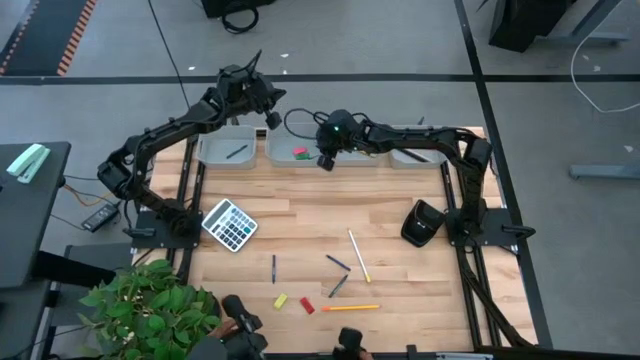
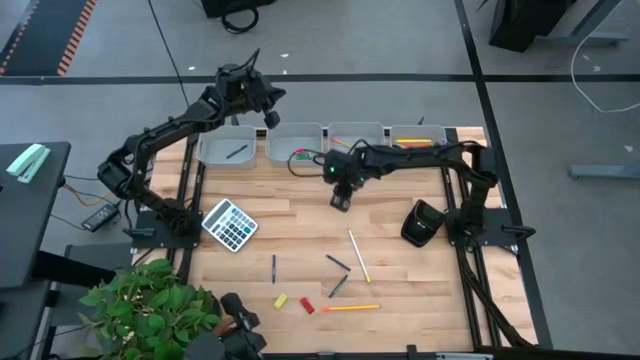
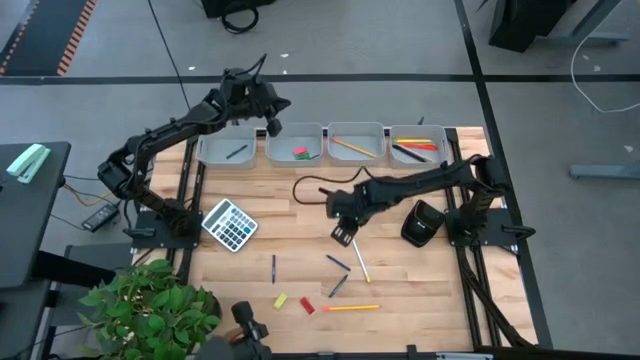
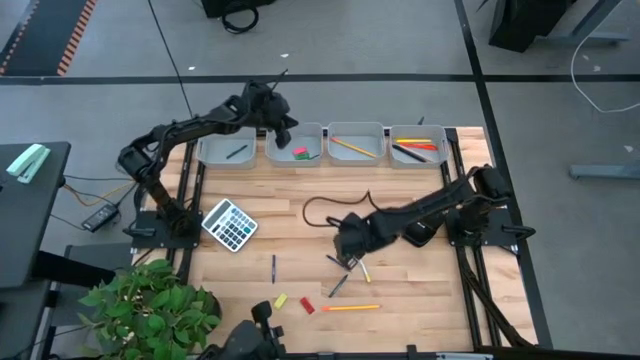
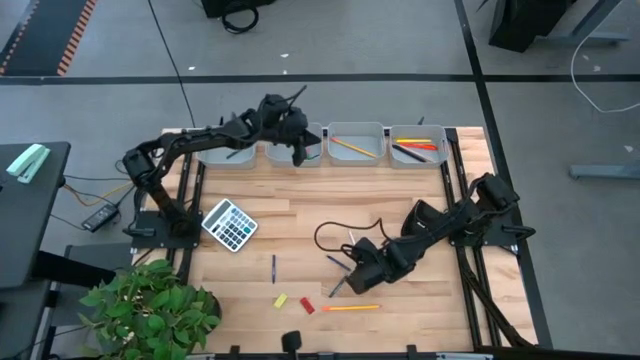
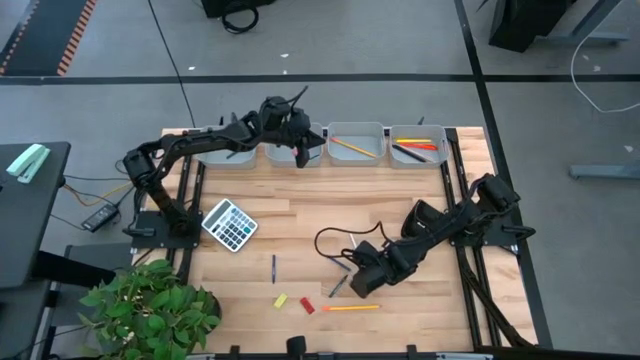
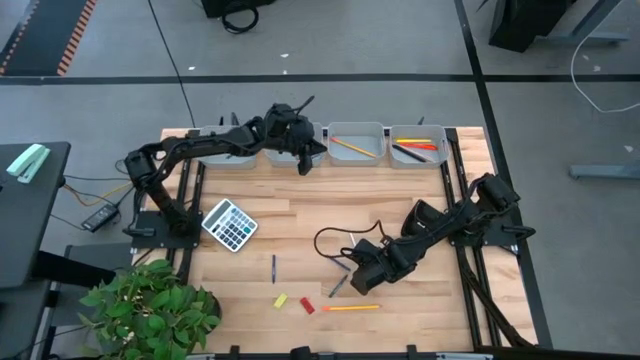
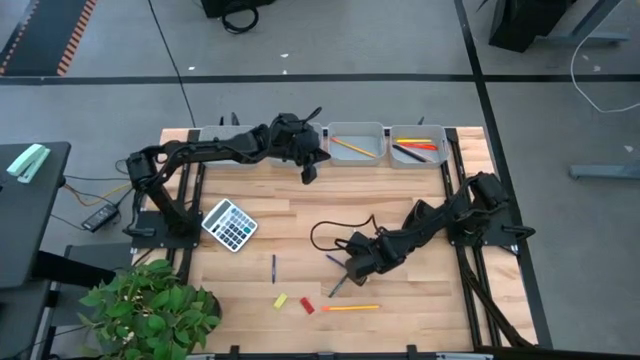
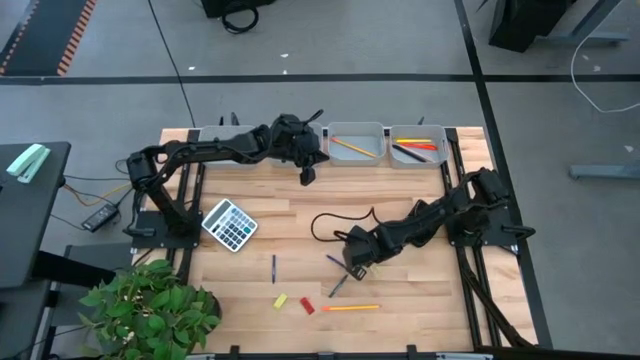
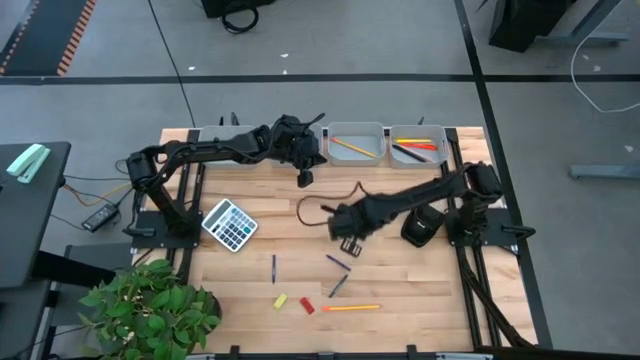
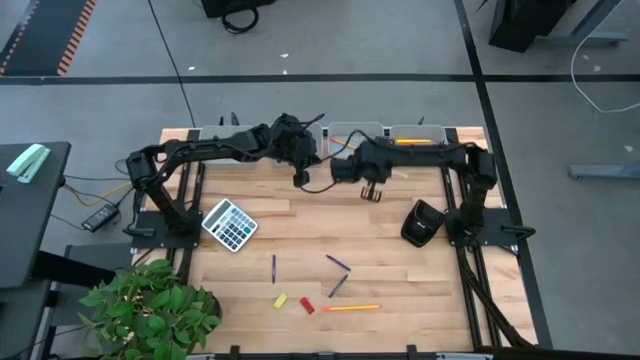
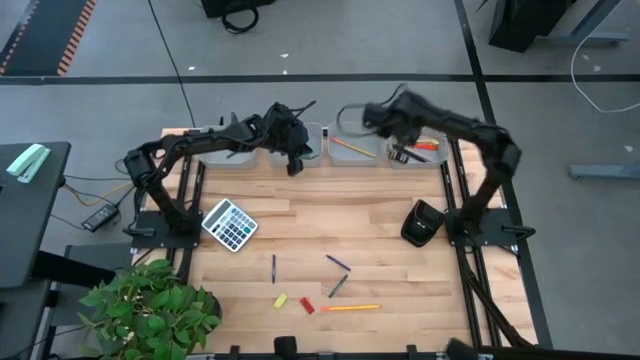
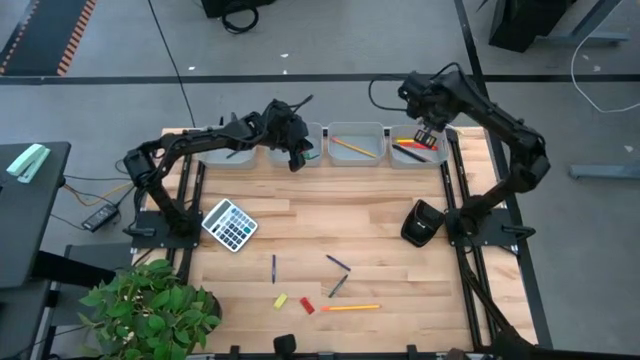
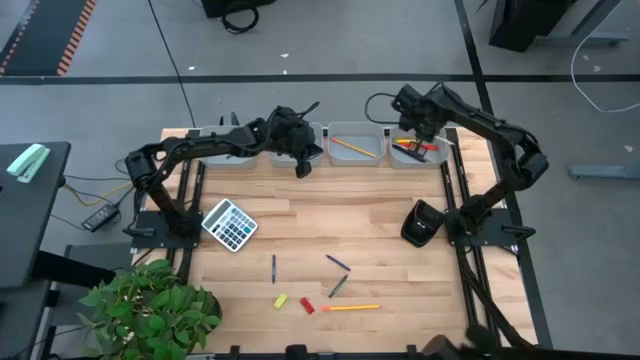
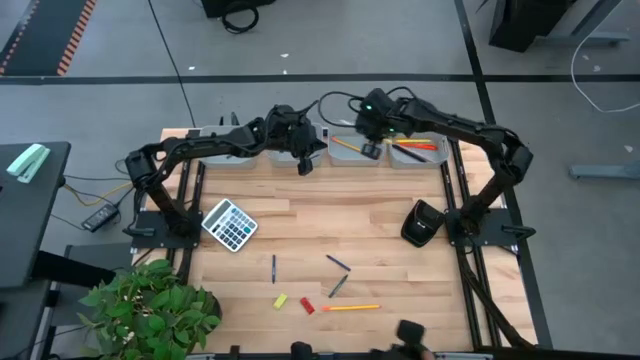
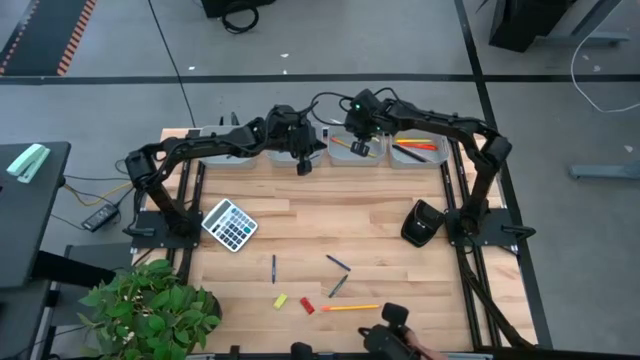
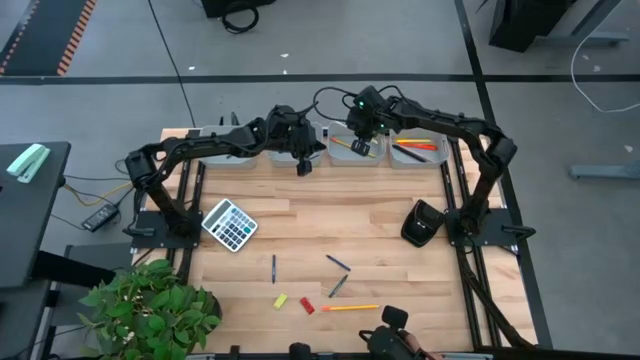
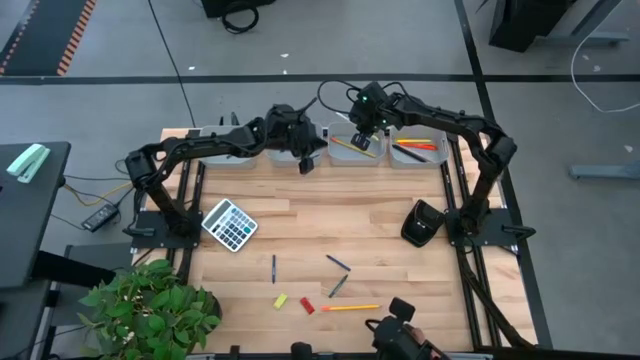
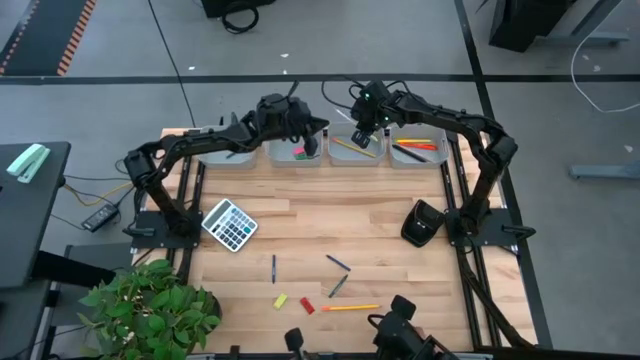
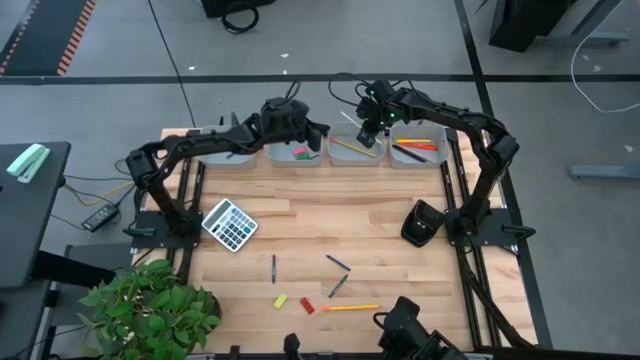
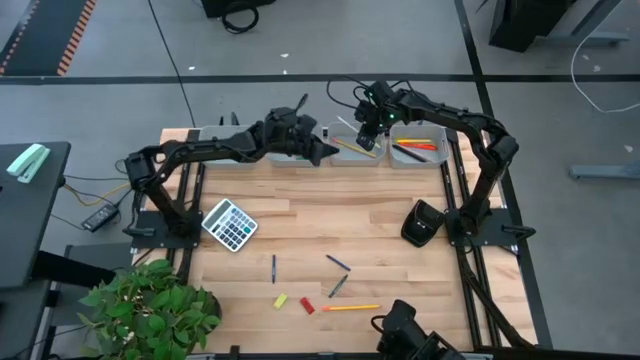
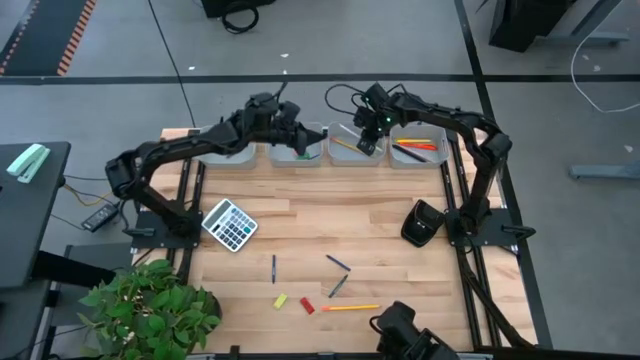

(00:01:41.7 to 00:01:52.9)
Task: Sort crayons/erasers/pens/pencils in bins
Put the white pencil into the gray bin

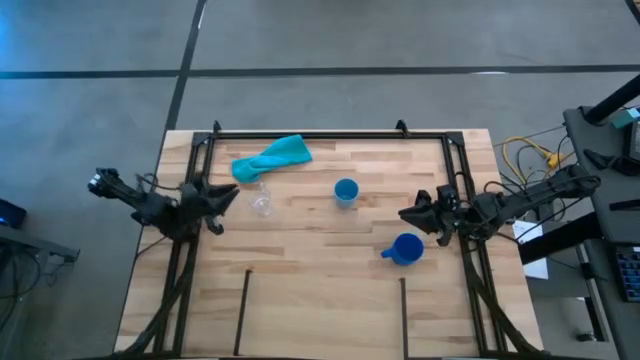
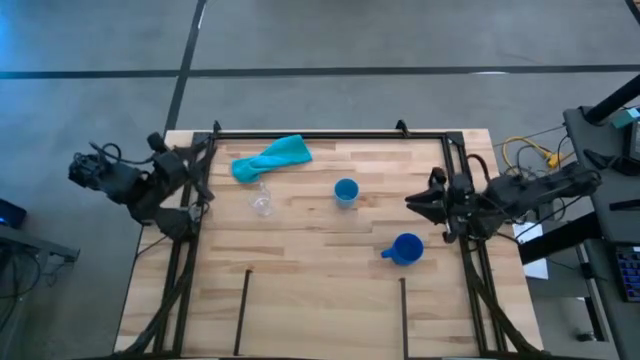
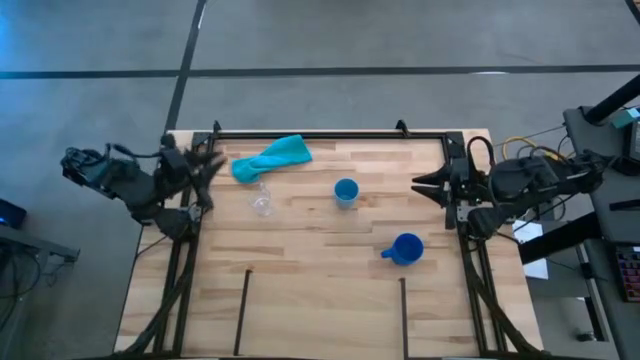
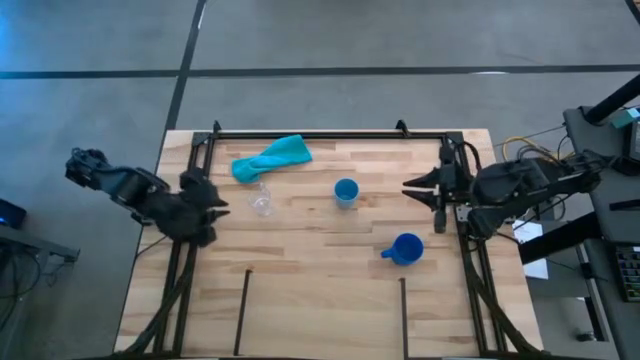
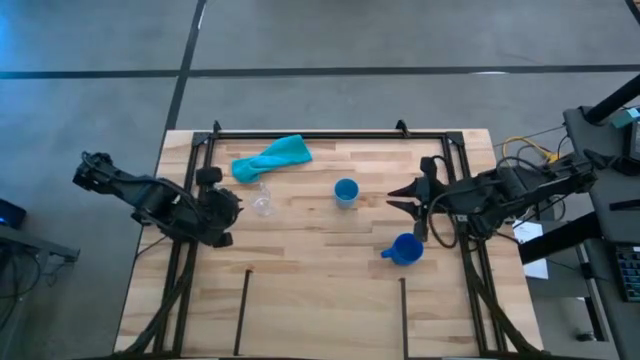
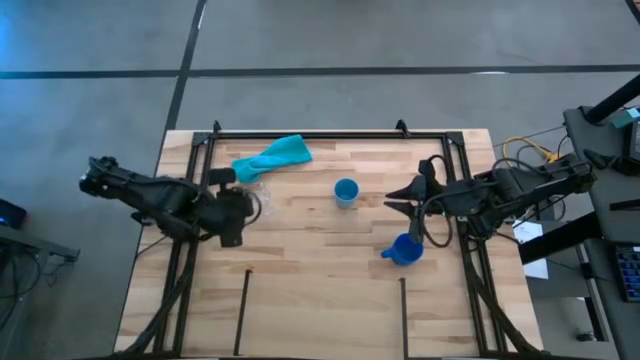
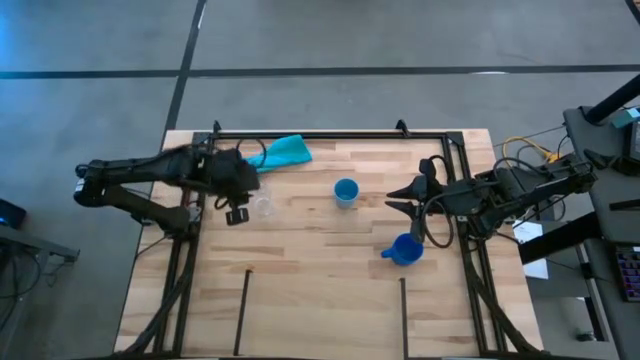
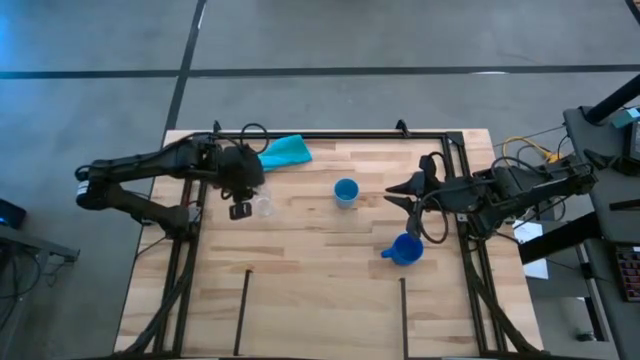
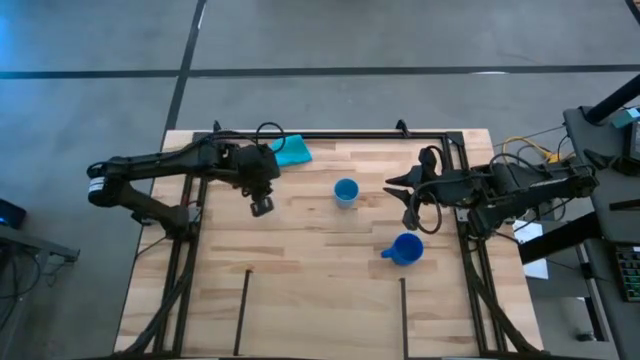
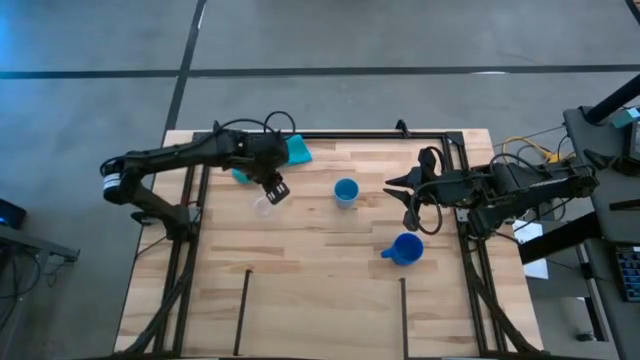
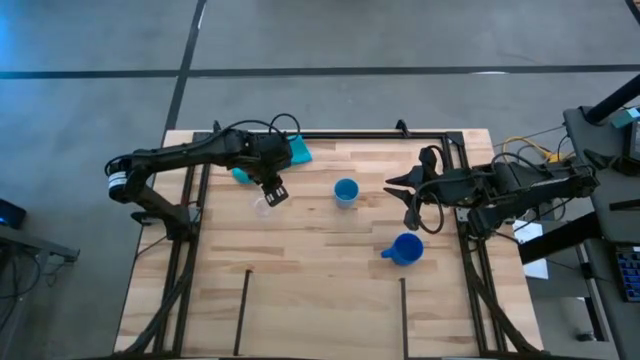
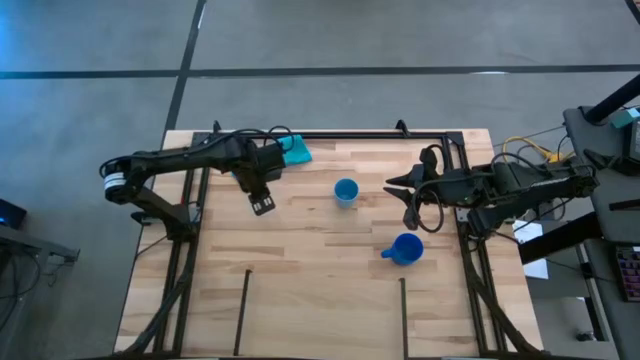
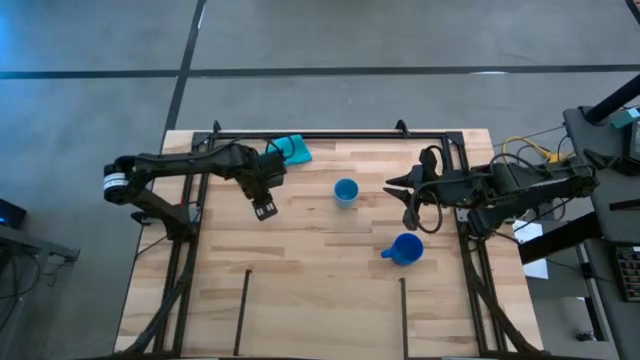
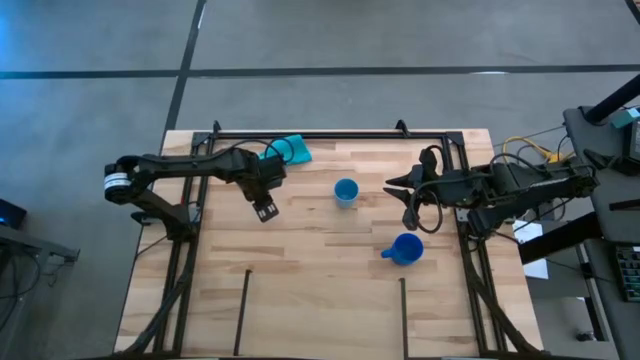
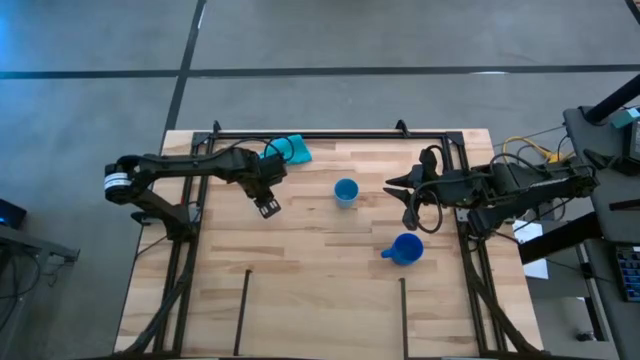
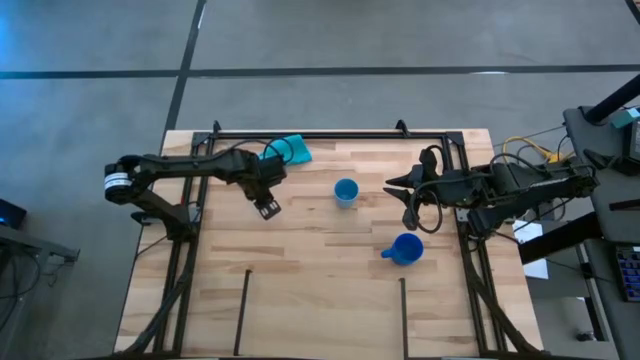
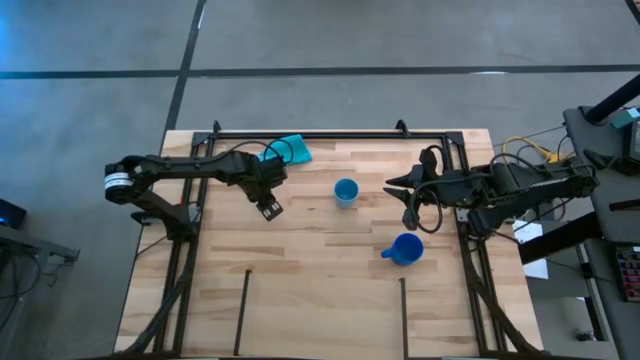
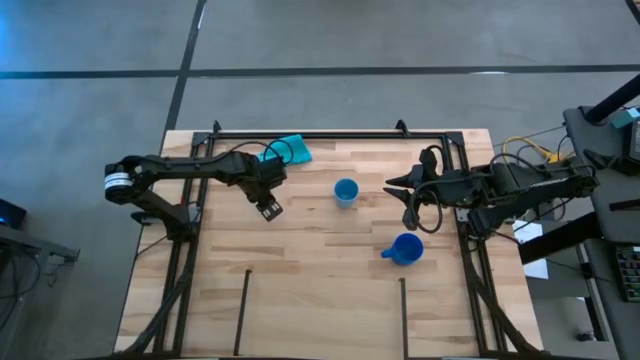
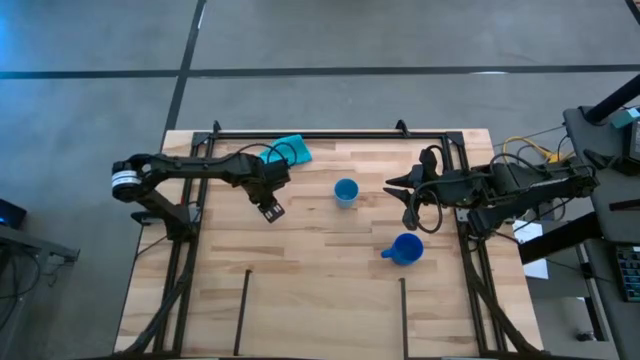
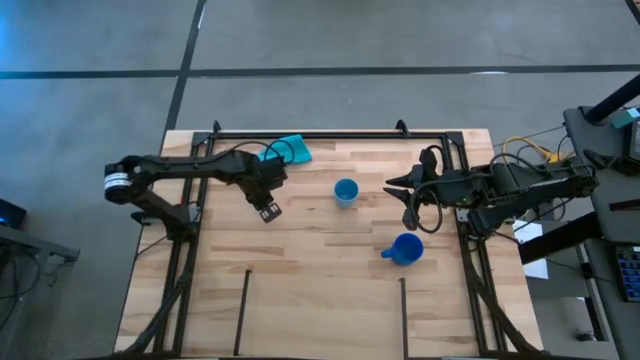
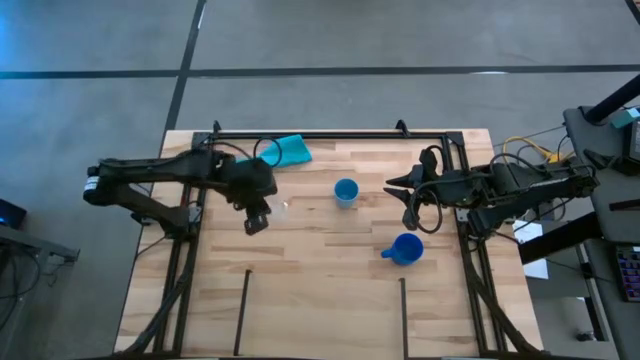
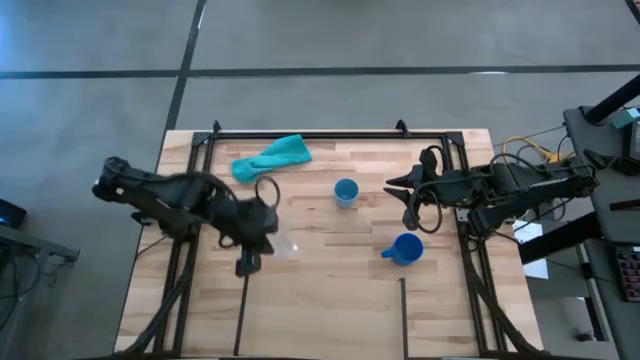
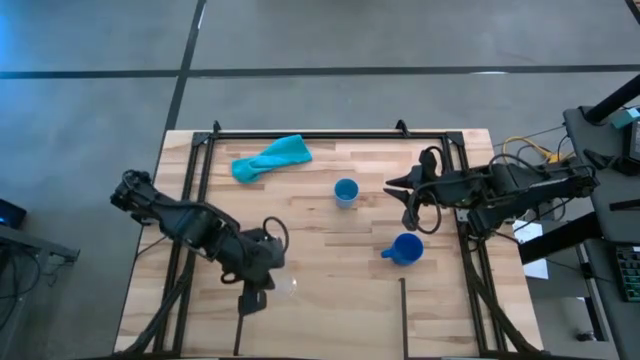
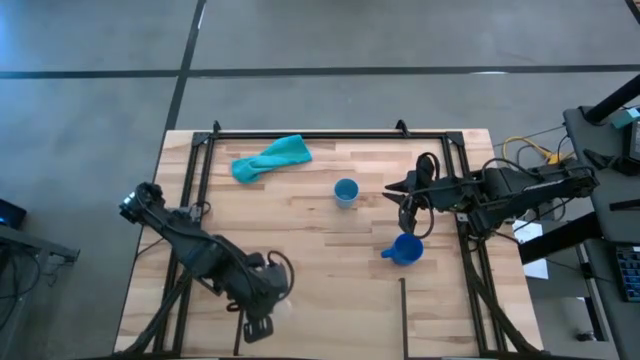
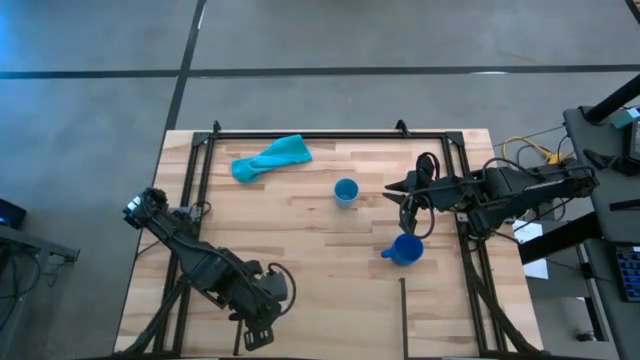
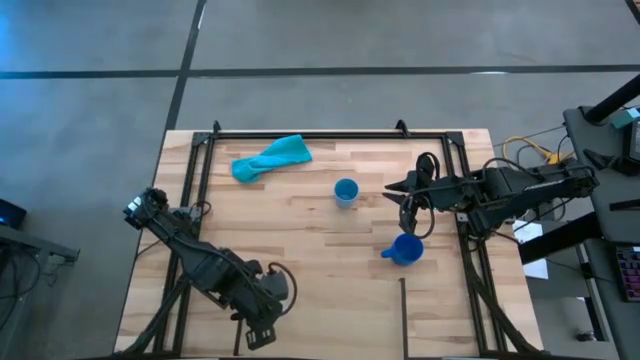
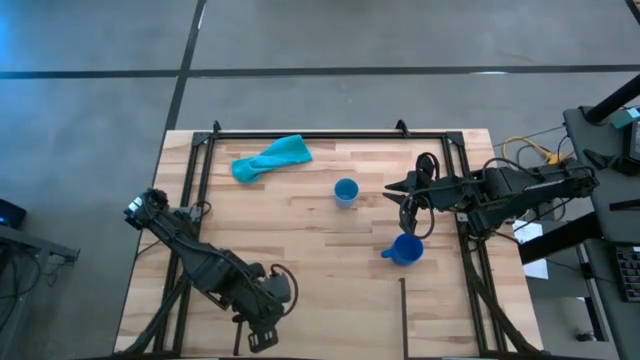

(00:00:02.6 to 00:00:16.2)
Task: Stack small to large cups/mugs on shelf
Put the transparent mug on the shelf
